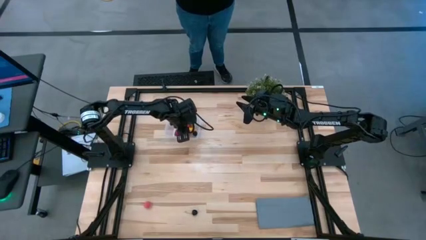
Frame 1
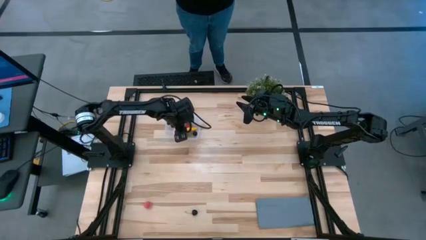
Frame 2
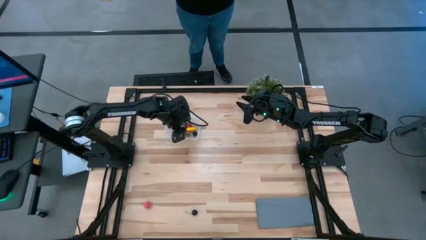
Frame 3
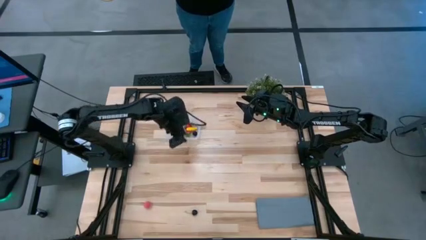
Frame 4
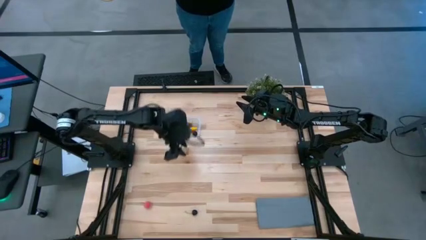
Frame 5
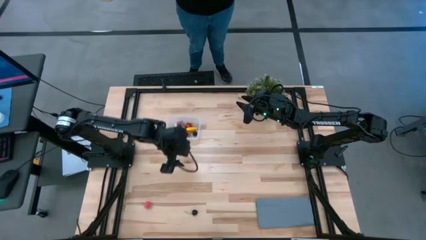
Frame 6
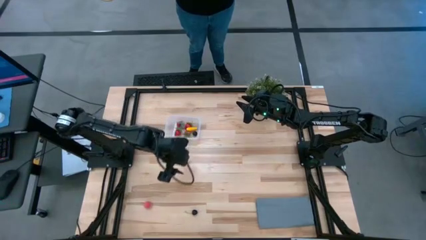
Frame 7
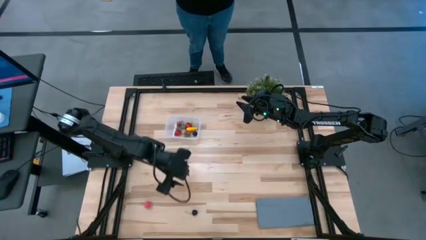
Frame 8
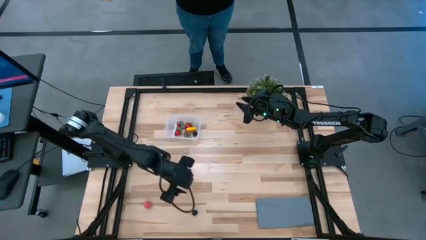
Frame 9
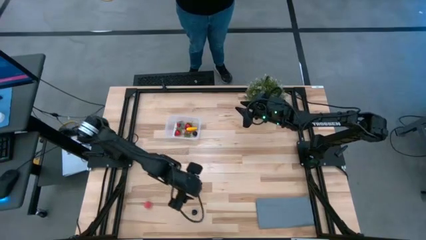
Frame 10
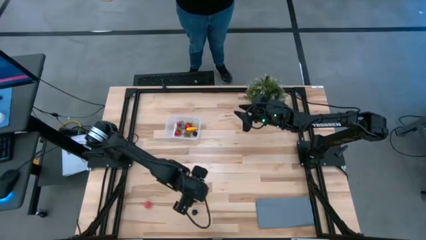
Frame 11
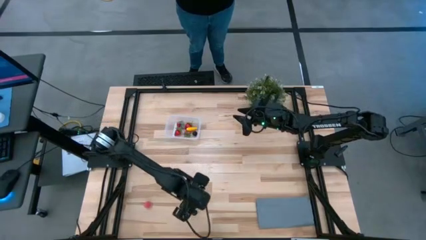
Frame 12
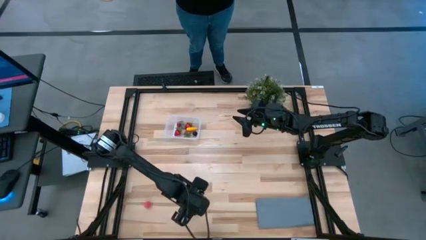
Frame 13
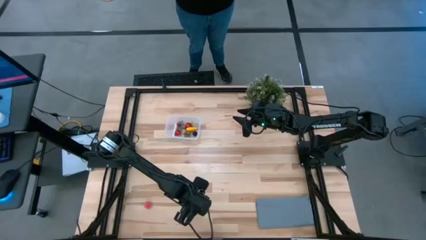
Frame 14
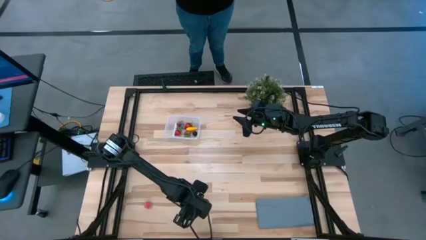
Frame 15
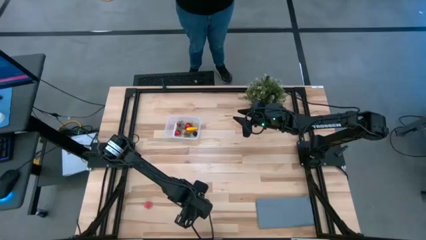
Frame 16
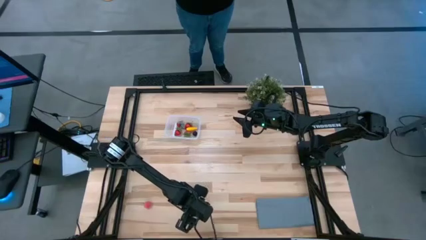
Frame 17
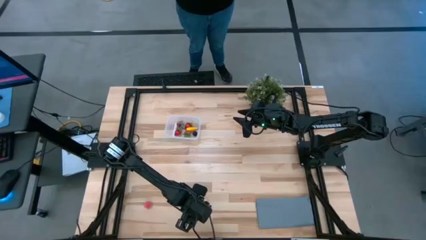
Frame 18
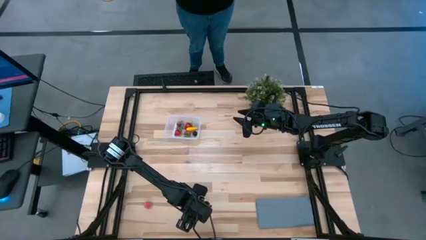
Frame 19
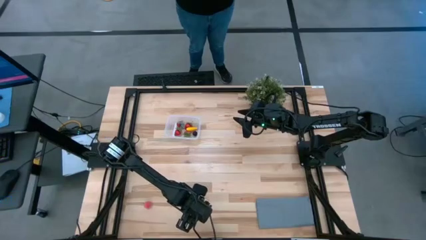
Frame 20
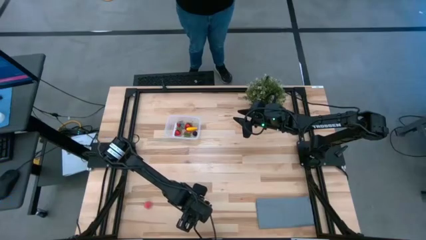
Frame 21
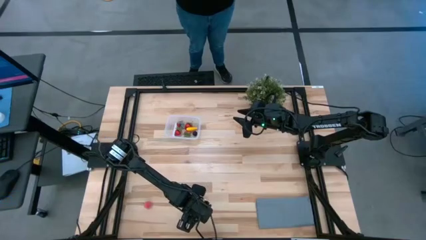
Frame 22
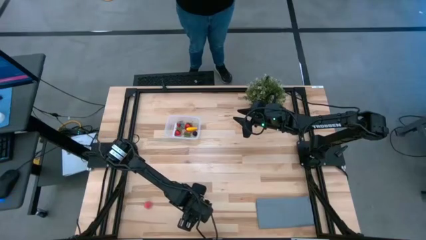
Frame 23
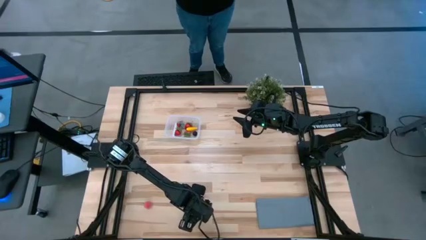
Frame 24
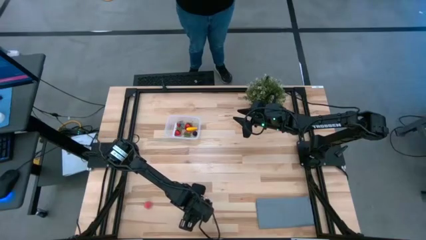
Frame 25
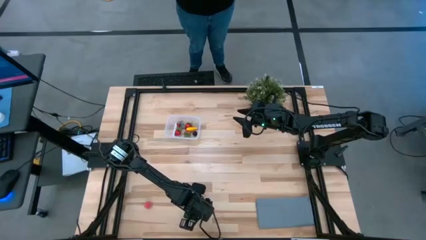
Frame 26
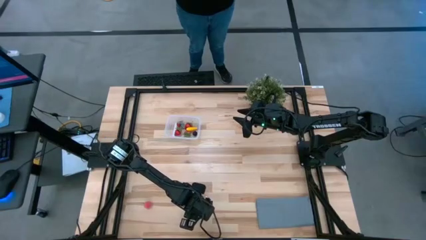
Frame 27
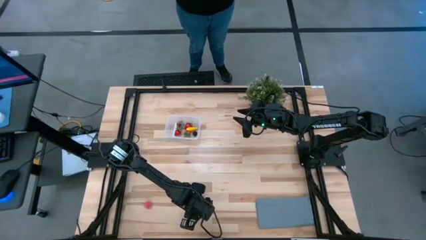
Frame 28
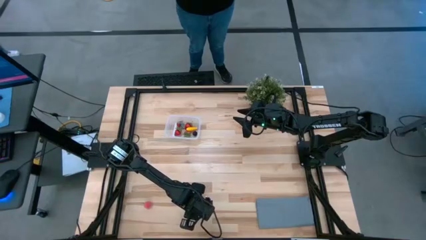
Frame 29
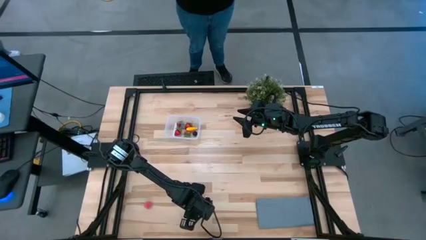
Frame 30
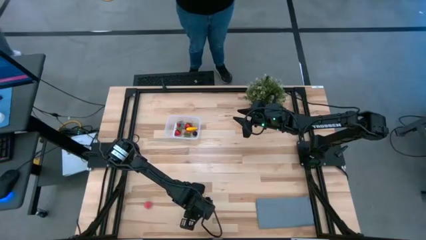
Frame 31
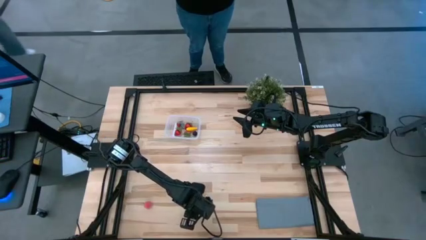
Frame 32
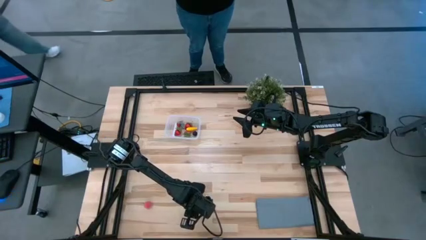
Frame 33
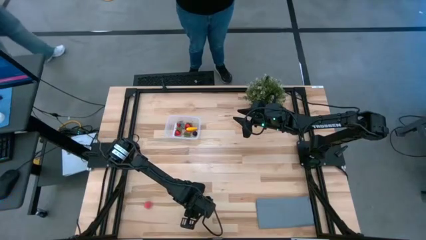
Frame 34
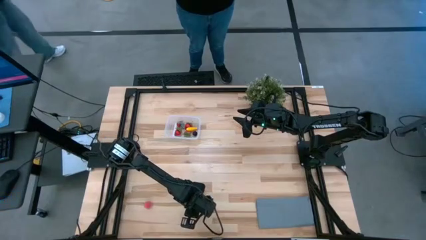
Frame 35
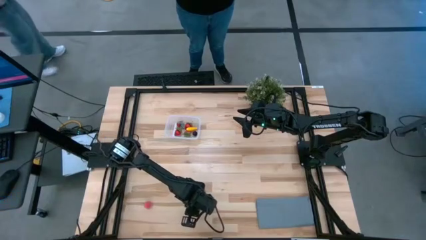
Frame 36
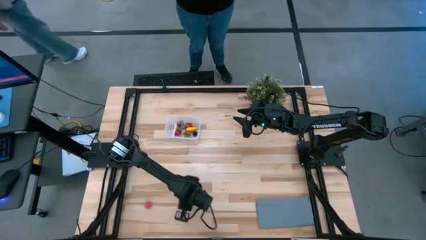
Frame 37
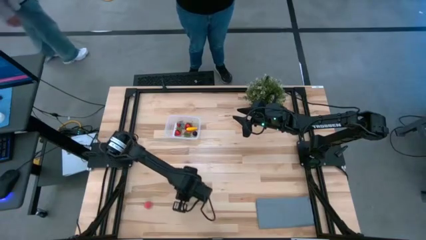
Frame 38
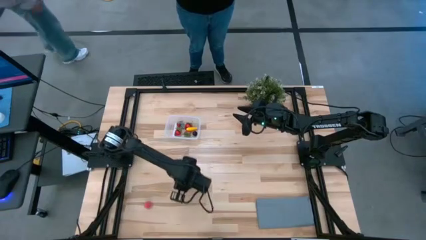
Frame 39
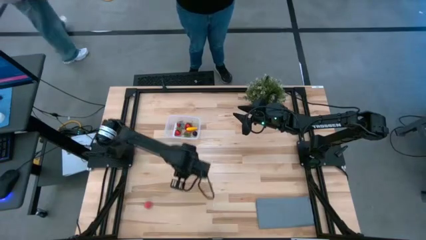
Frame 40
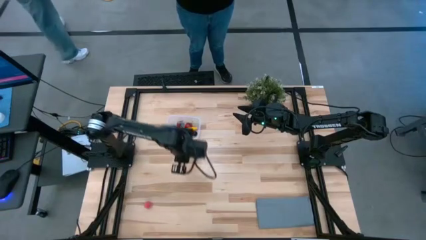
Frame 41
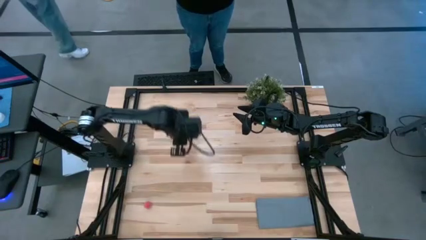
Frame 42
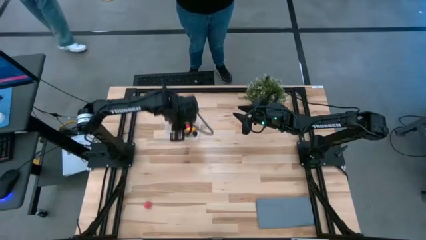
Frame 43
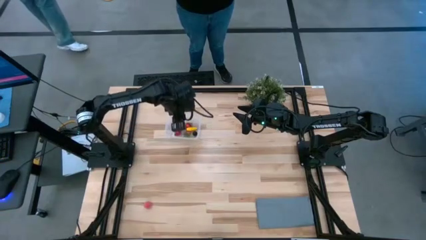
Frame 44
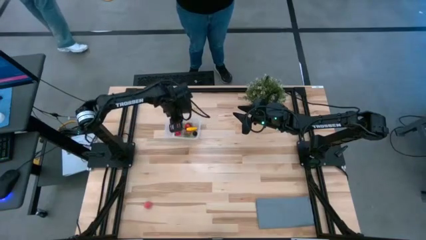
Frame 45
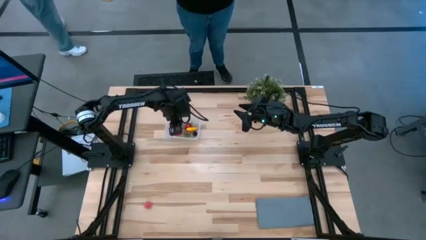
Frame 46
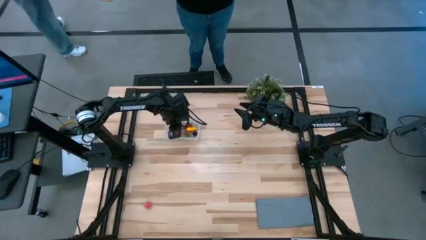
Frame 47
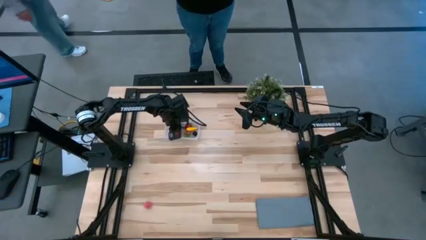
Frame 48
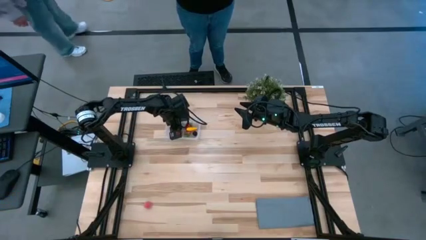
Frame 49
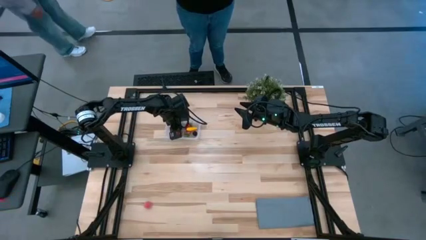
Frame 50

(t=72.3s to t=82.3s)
Task: Pick and placing Produce into tupperware
Put the cherry into the transparent bin
